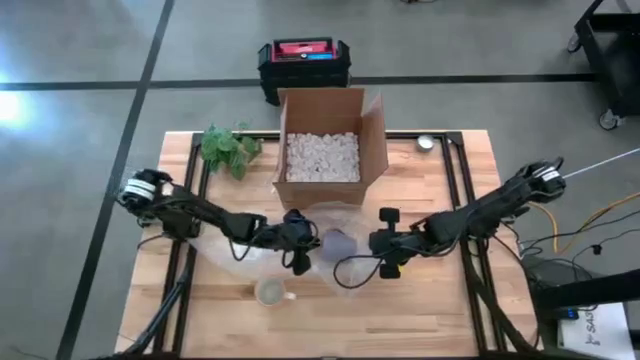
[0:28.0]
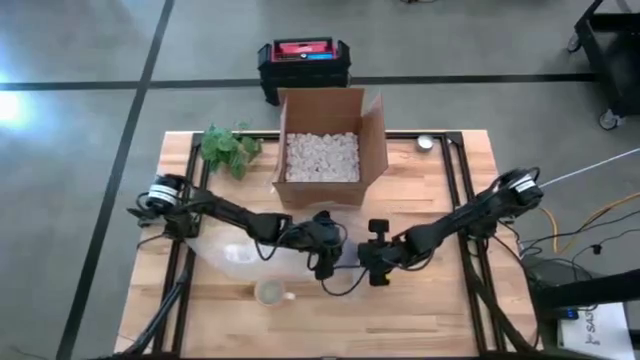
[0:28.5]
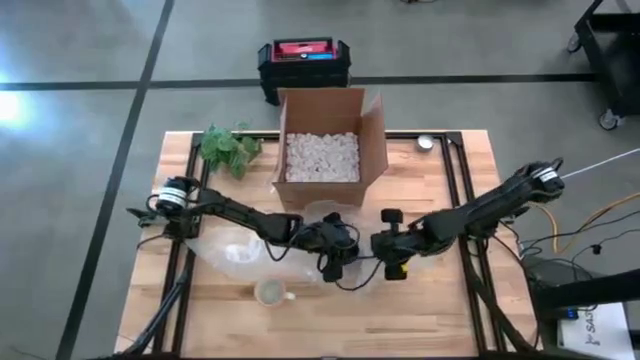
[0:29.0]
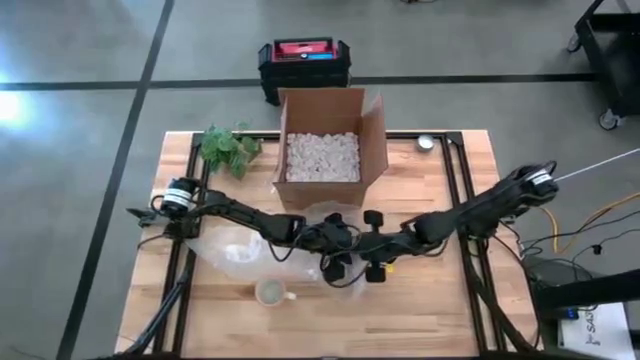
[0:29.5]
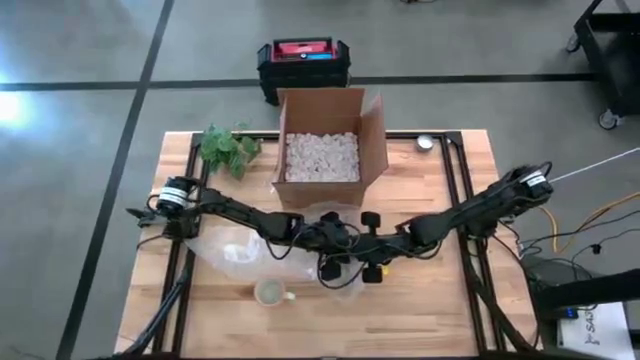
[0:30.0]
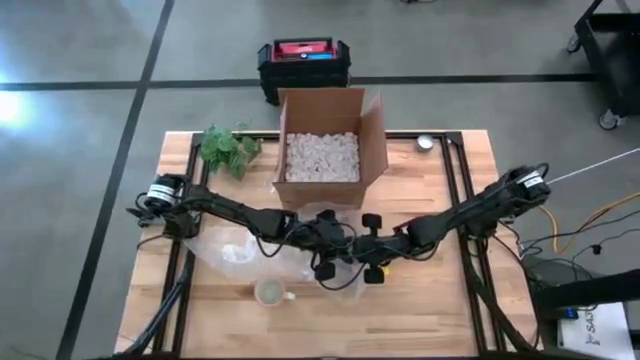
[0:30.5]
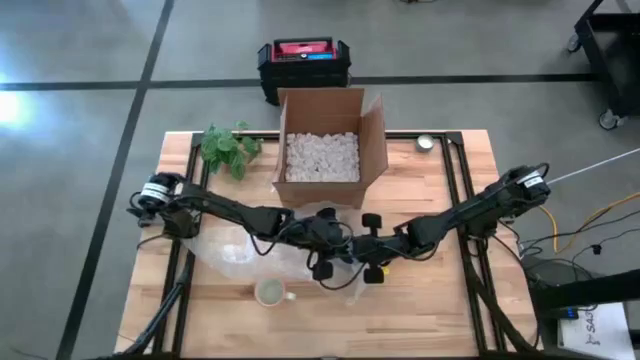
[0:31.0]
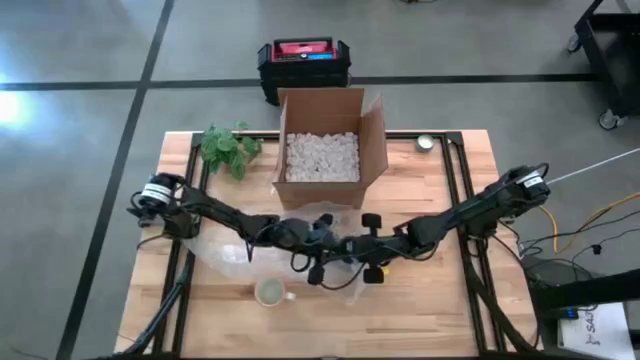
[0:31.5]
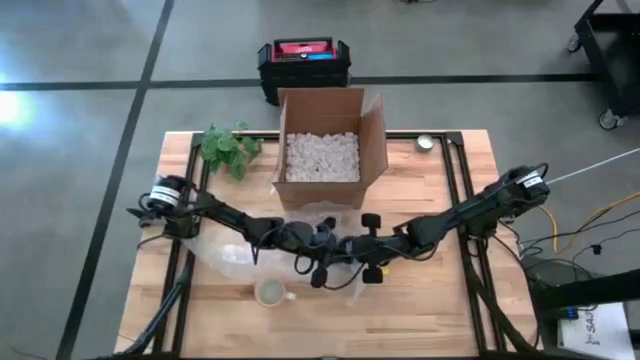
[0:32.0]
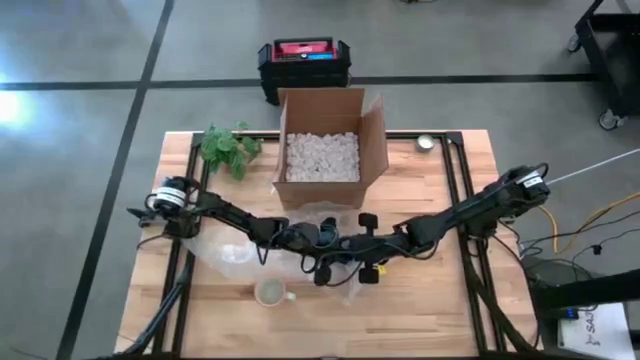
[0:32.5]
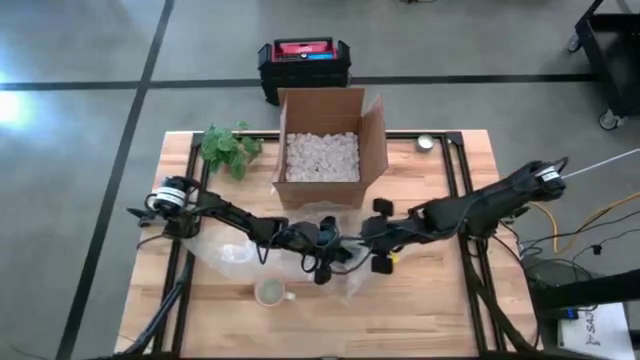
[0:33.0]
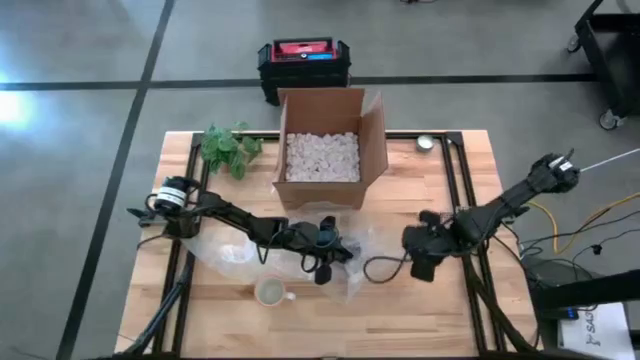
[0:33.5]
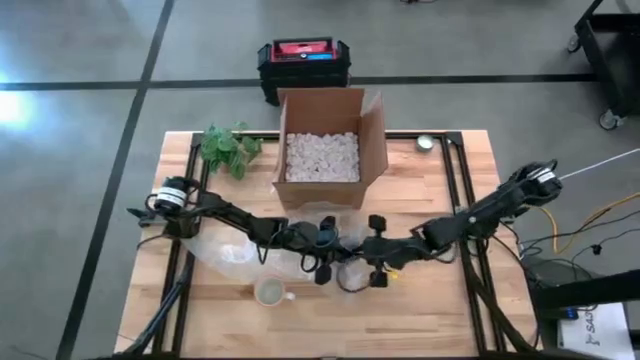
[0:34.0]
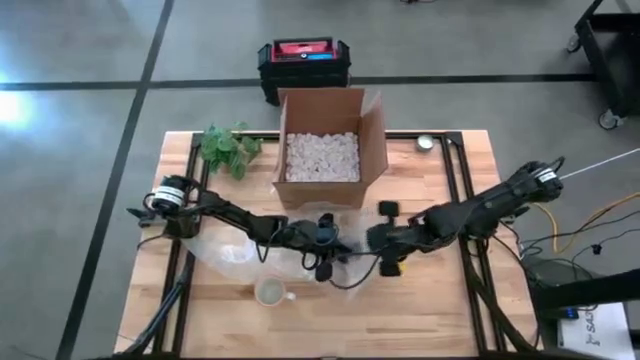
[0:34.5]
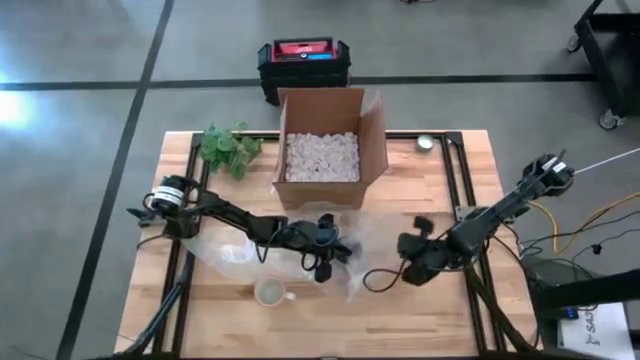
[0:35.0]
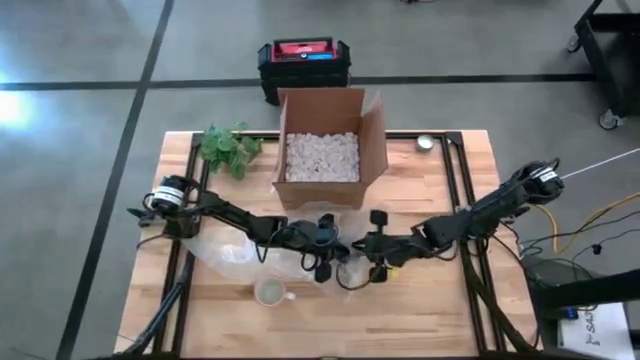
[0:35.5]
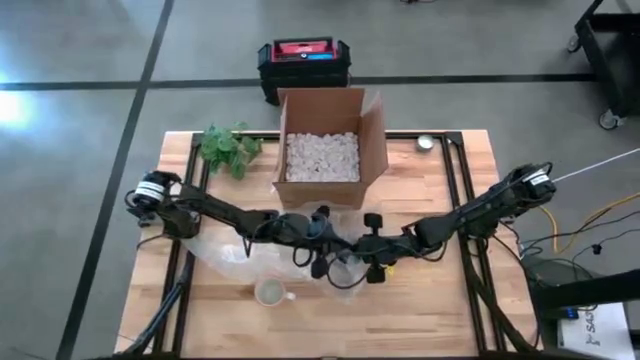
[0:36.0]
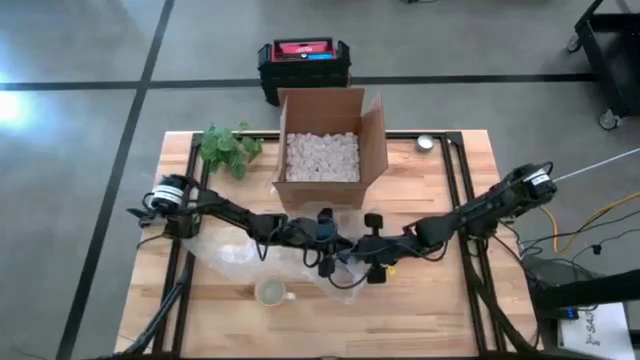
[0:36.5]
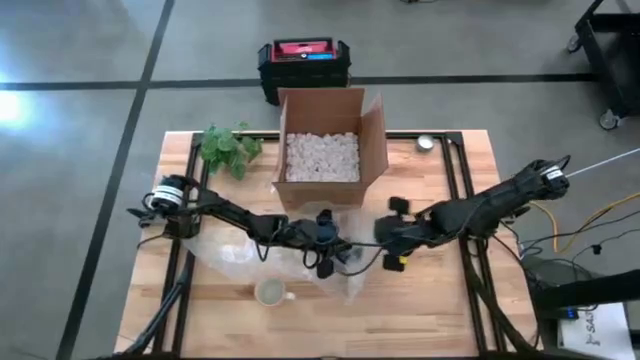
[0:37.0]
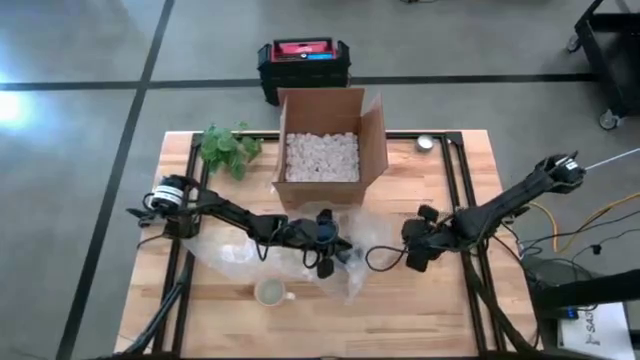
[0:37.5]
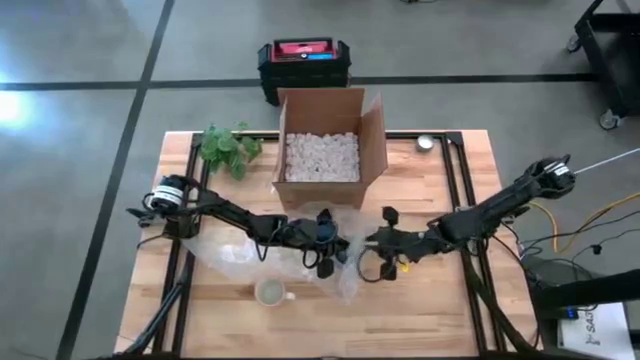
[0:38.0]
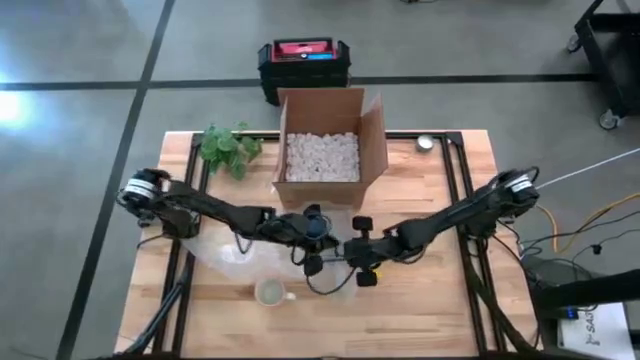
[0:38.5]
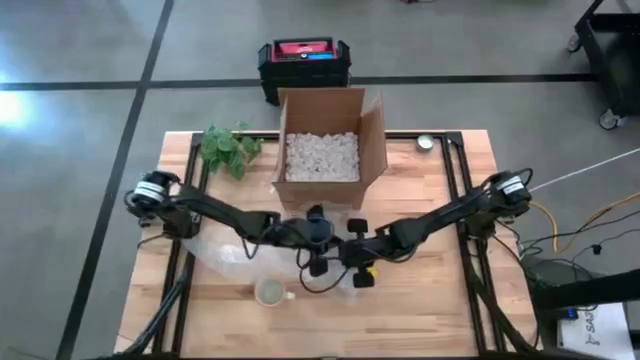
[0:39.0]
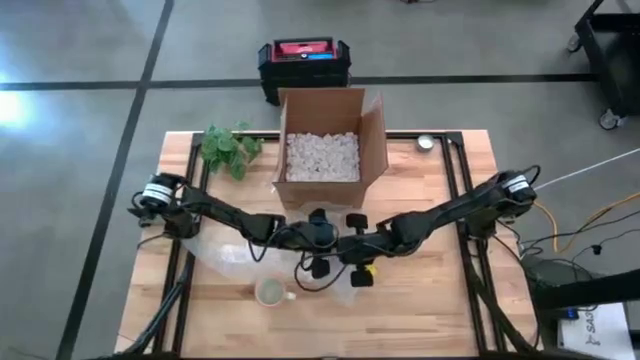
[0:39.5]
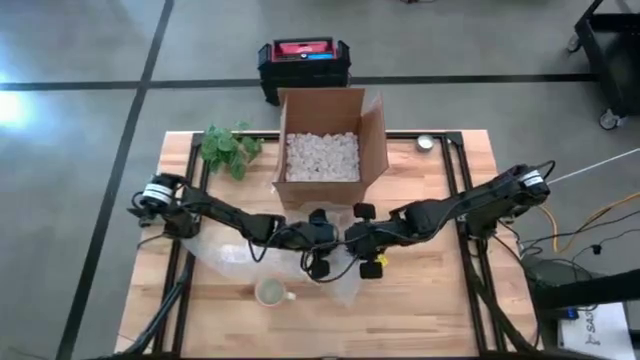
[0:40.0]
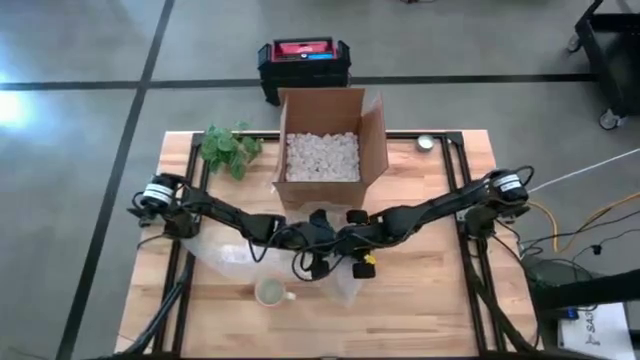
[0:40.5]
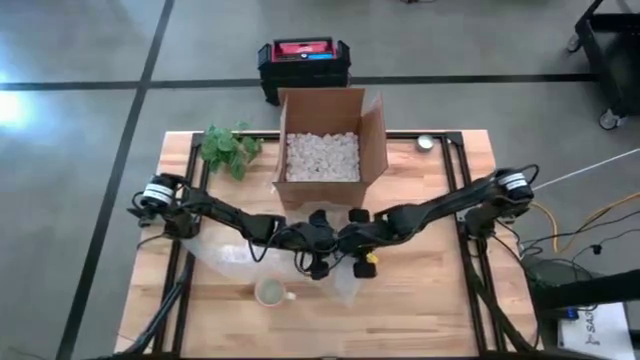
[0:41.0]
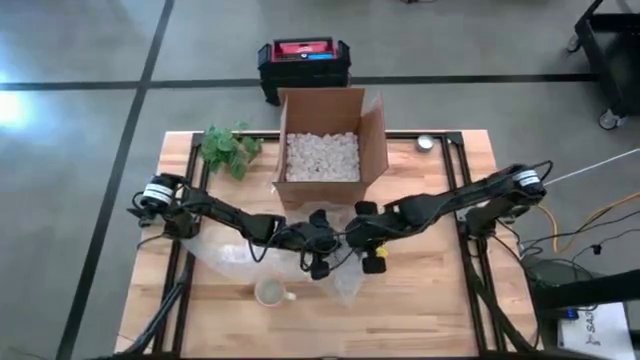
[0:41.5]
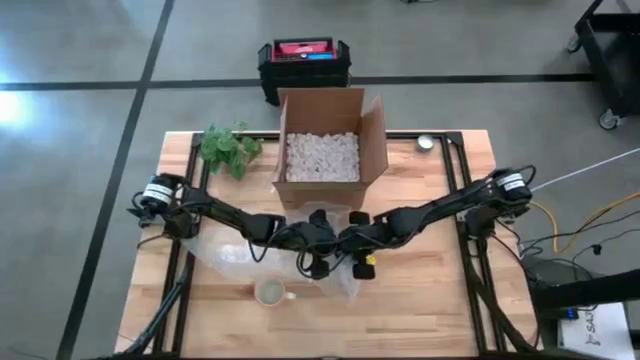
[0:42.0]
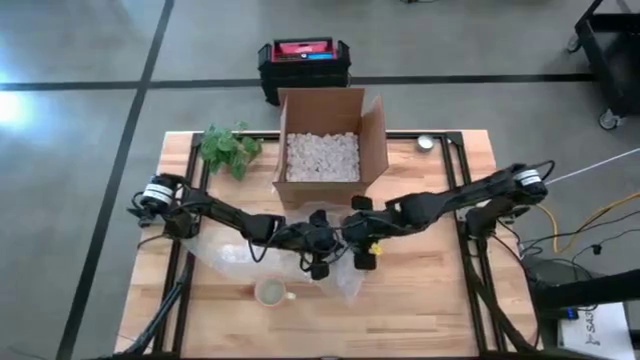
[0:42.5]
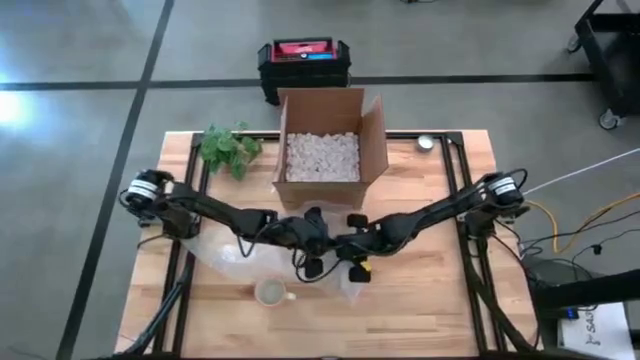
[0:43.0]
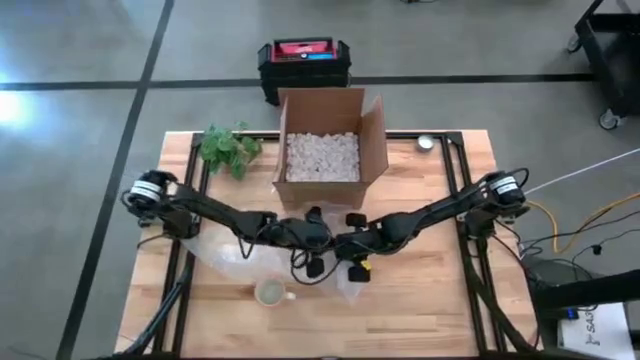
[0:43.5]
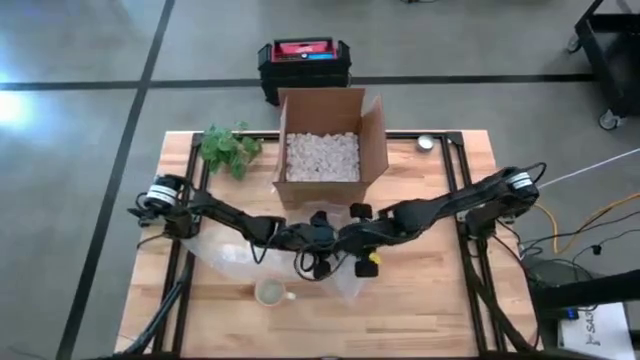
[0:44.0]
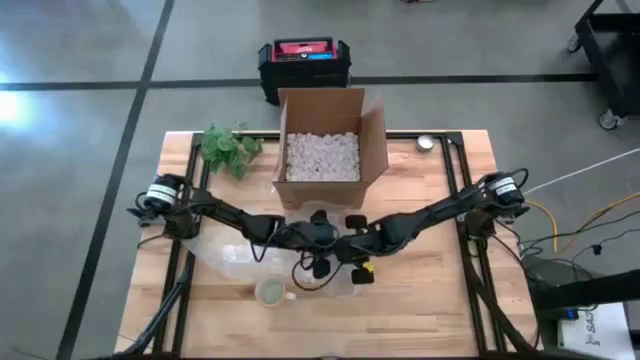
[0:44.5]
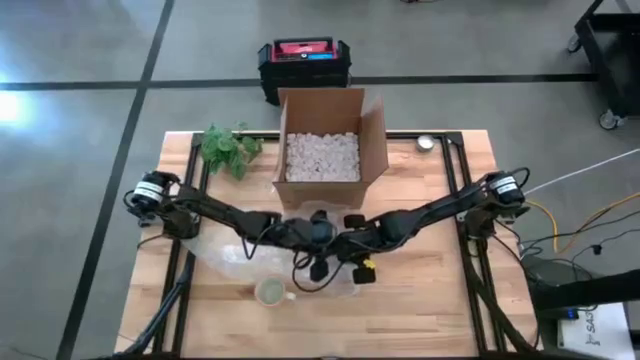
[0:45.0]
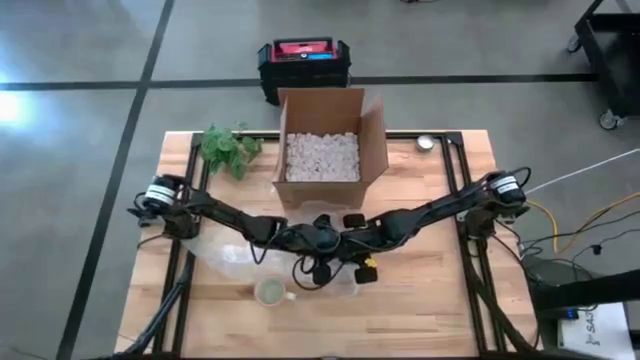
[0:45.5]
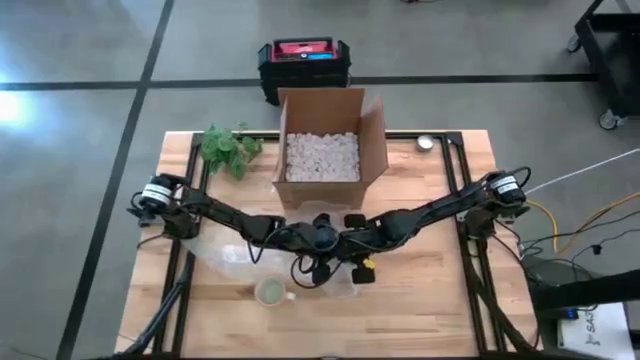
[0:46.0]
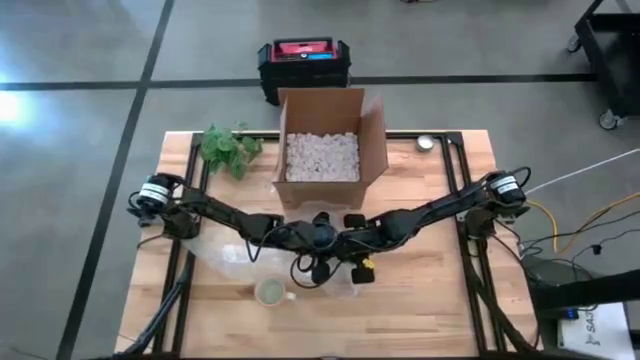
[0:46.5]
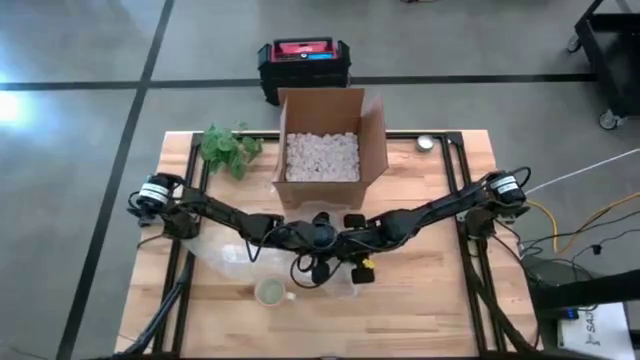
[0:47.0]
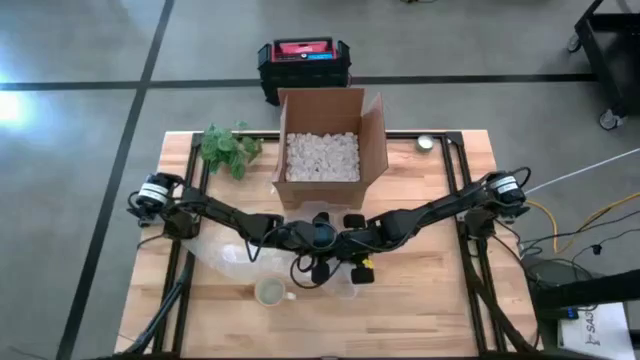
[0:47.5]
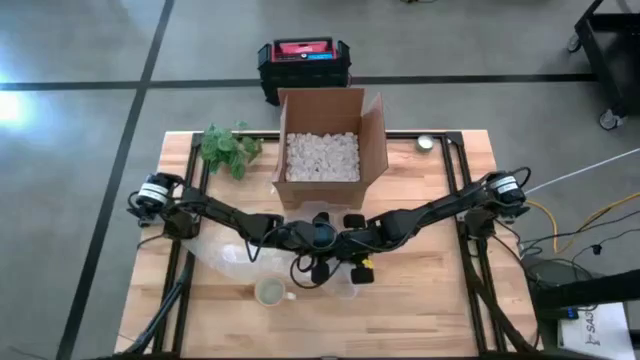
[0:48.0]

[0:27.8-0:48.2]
Task: wrap mug
Wrap the blue mug with the right bubble wrap
